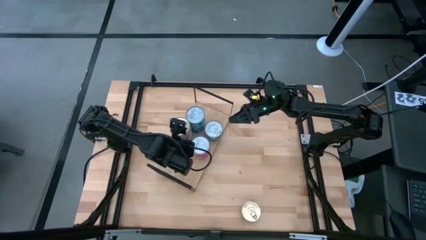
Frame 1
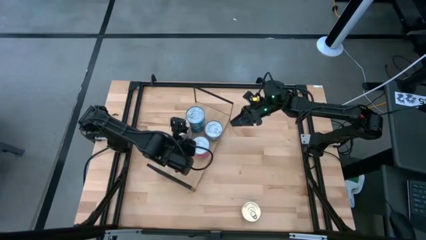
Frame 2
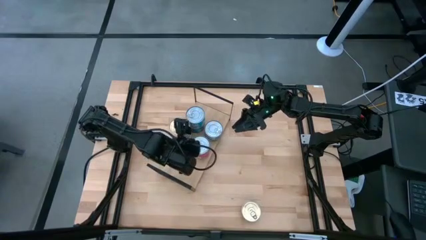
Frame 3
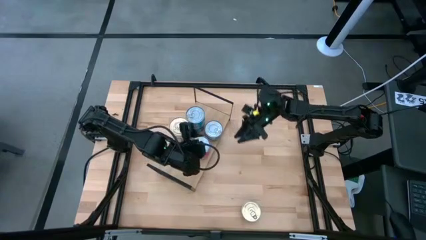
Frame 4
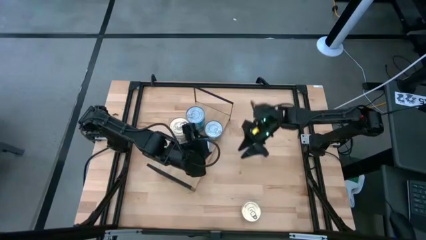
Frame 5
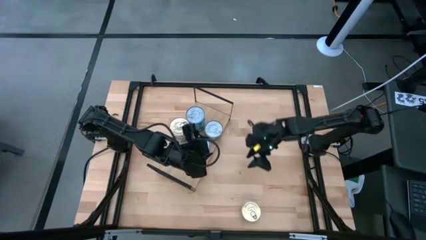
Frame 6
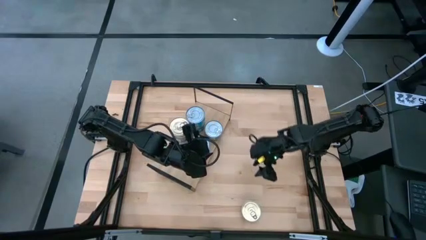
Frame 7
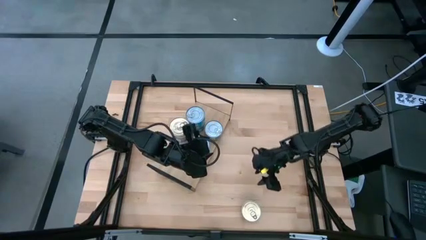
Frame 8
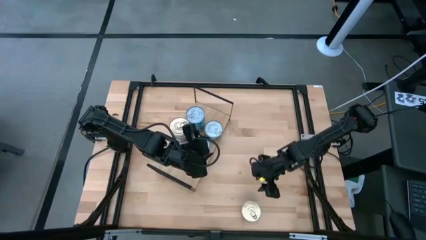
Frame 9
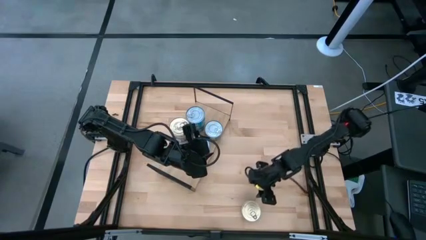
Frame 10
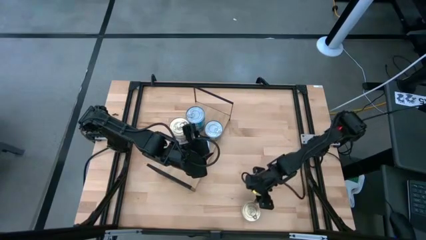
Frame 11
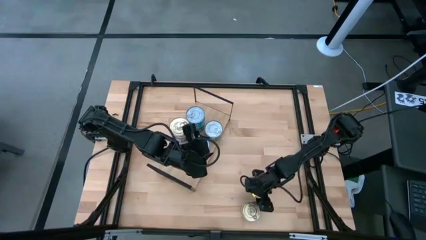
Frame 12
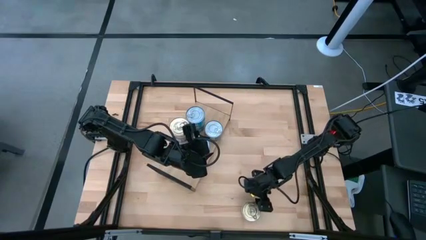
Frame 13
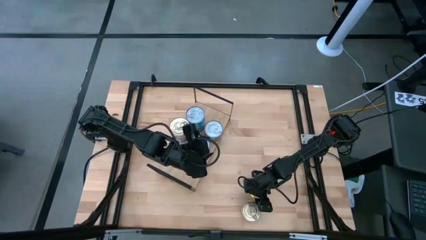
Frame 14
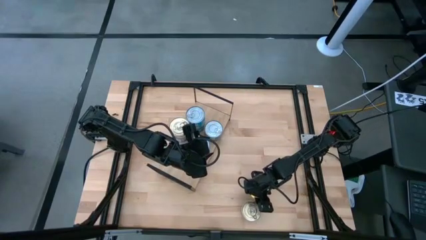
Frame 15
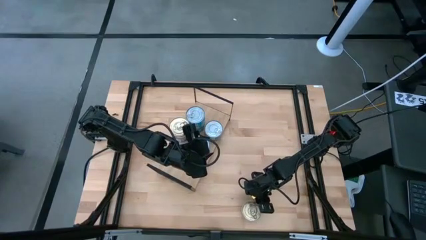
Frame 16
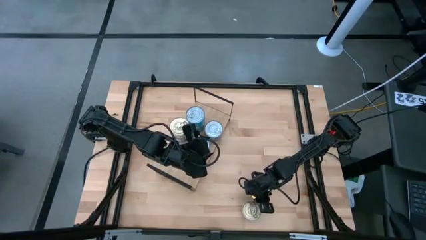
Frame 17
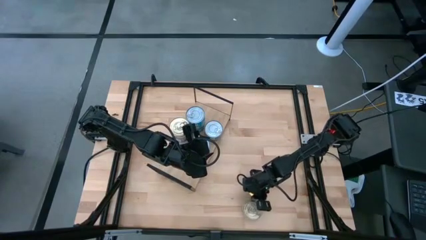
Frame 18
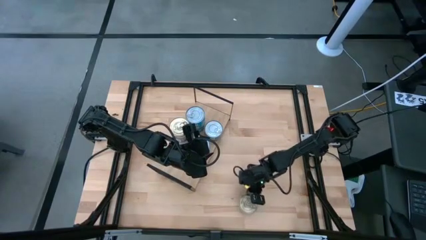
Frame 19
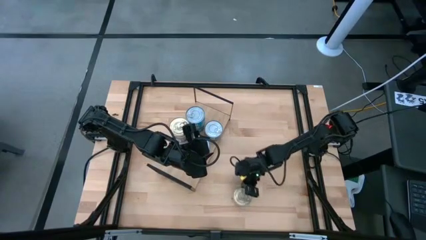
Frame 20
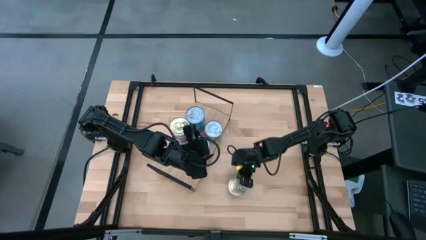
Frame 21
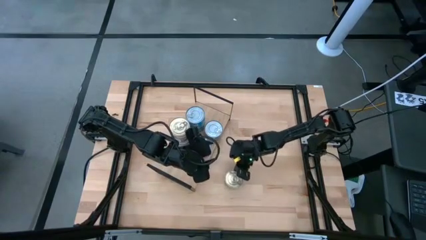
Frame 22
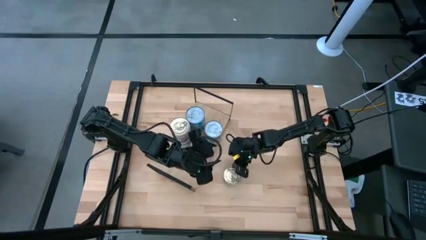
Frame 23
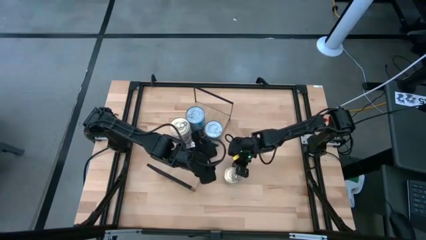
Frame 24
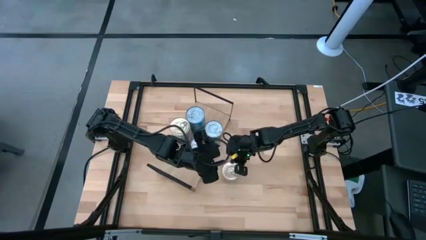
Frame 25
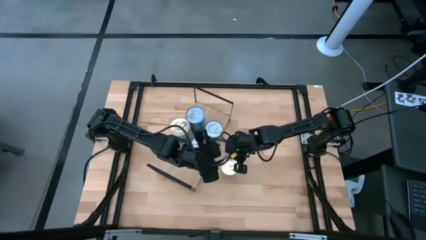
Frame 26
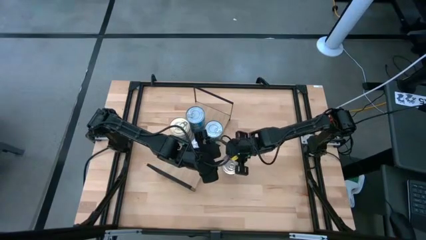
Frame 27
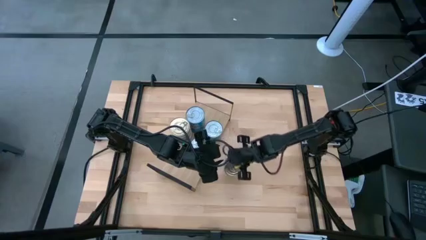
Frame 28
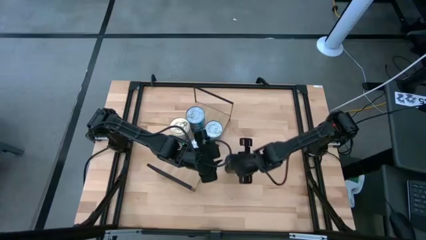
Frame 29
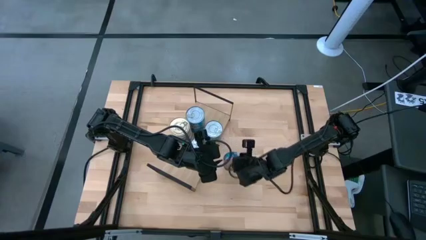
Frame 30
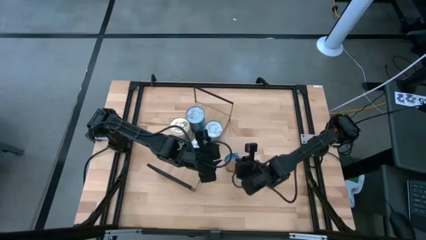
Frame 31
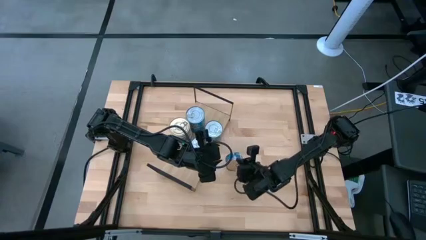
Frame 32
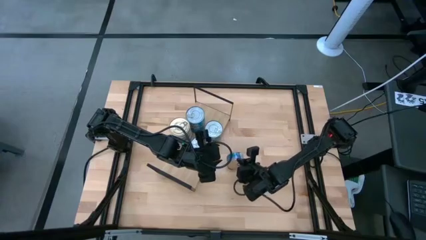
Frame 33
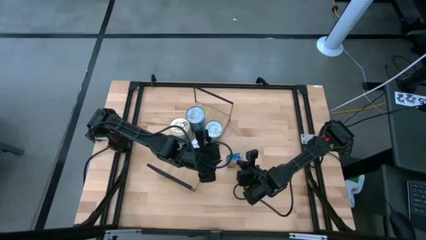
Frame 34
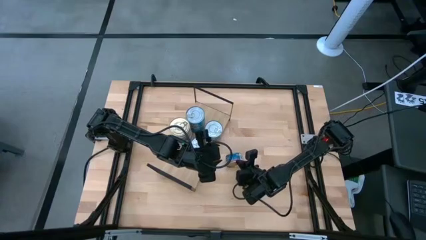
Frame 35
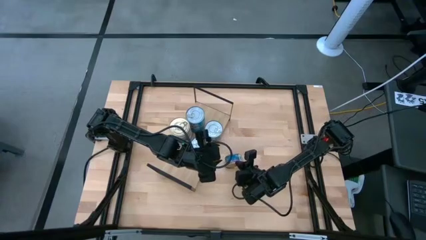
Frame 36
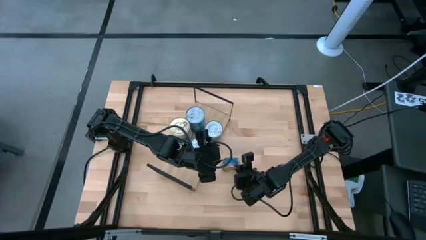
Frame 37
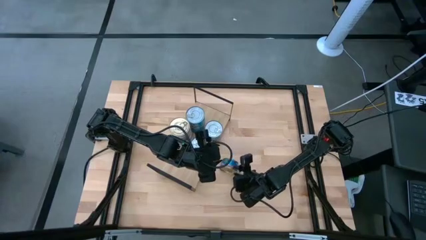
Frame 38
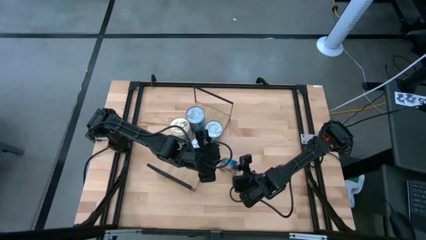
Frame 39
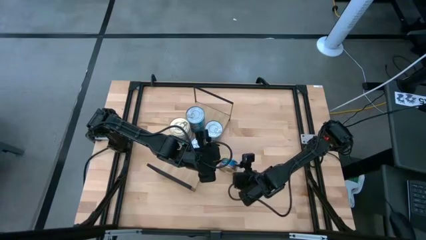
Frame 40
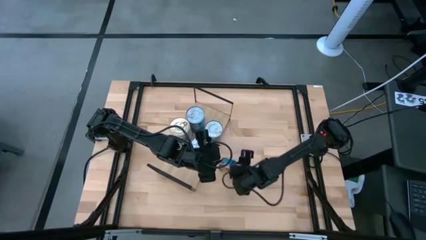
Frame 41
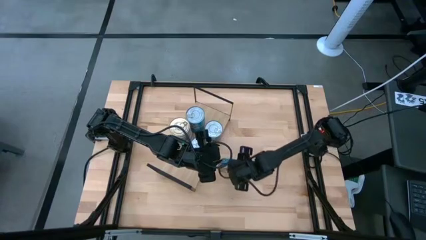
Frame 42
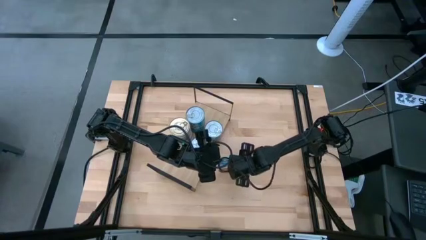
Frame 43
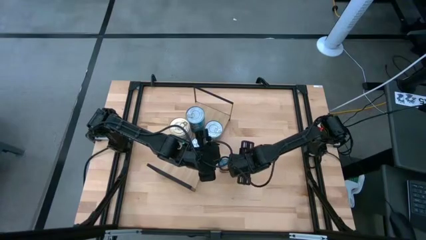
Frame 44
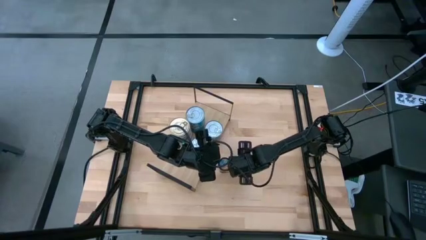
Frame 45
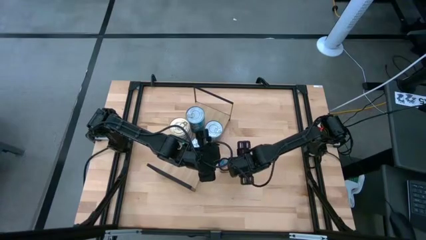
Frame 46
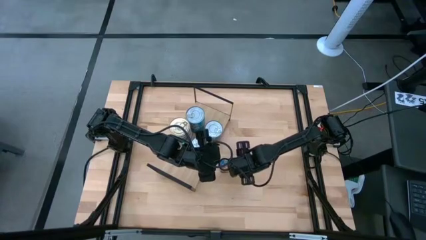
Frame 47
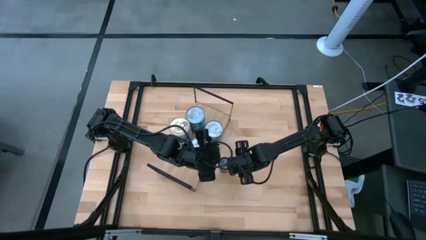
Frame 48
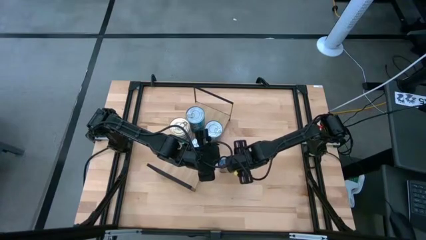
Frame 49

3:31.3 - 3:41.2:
Task: Stack canned seafood by type on shelf
Stack the blue tuna can on top of the blue tuna can on the shelf

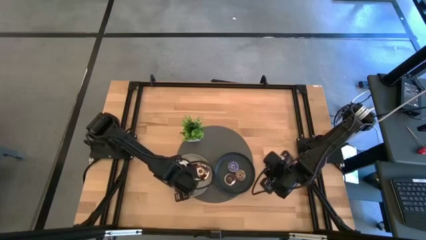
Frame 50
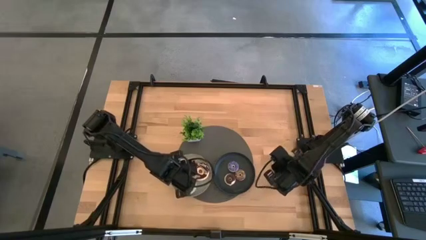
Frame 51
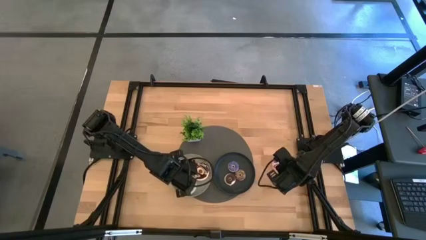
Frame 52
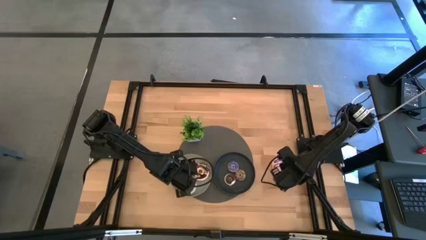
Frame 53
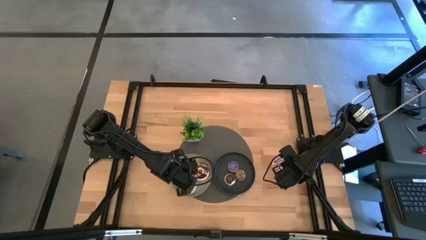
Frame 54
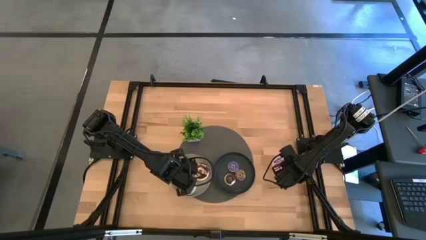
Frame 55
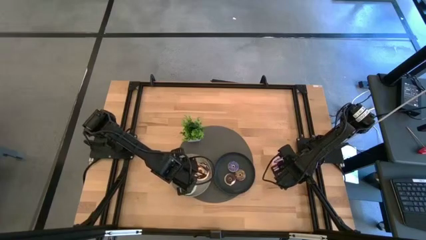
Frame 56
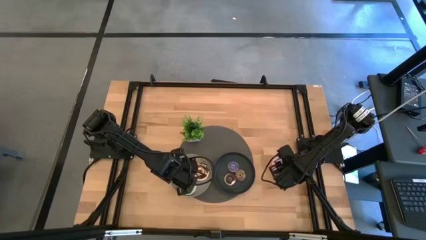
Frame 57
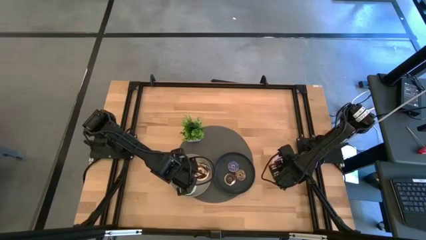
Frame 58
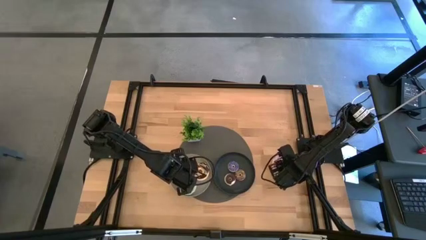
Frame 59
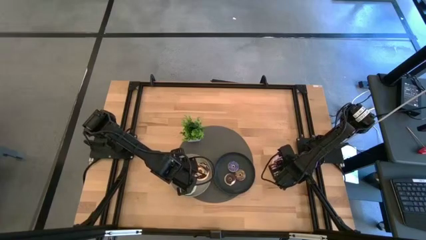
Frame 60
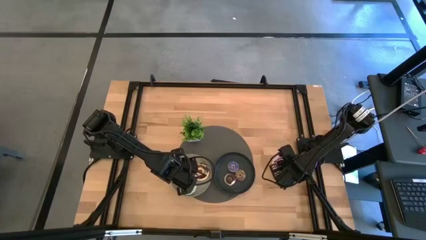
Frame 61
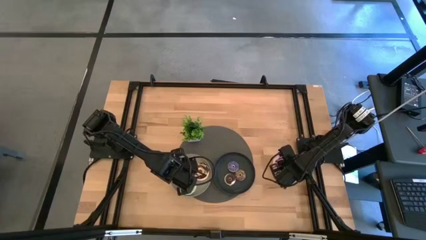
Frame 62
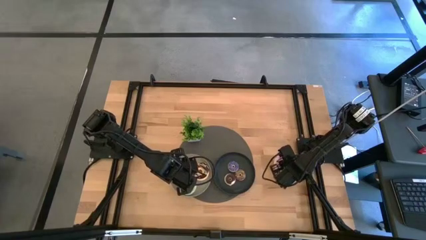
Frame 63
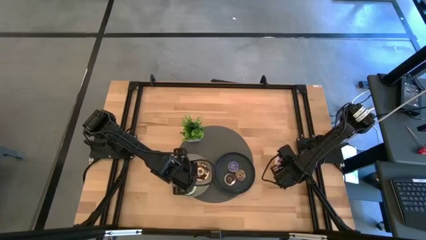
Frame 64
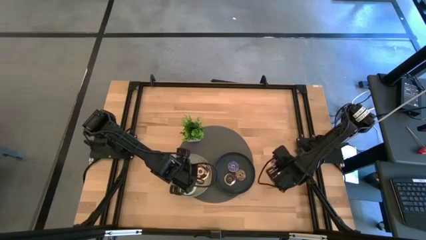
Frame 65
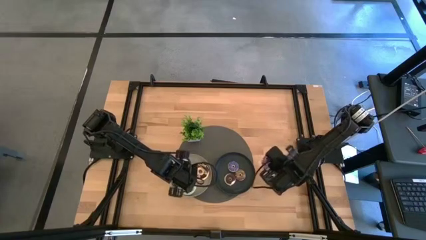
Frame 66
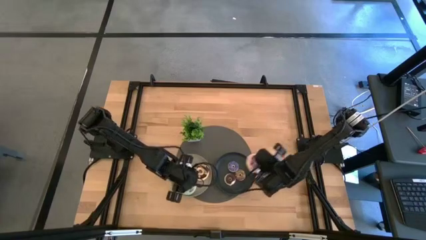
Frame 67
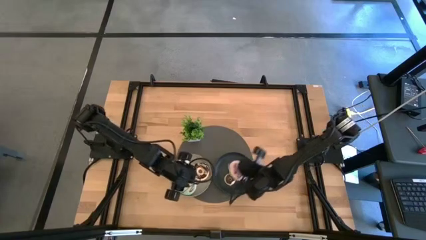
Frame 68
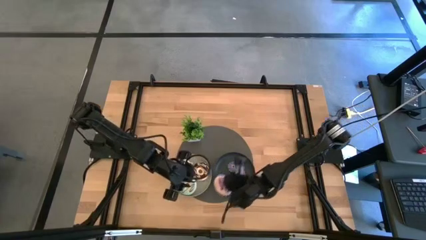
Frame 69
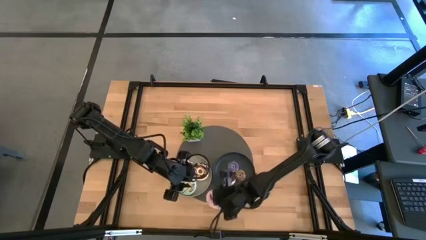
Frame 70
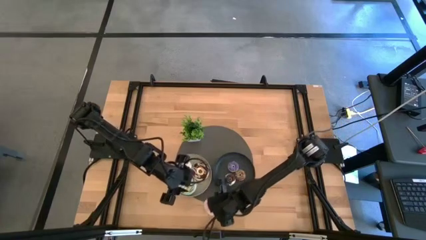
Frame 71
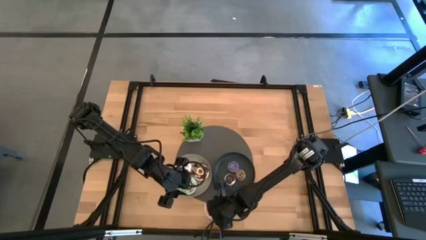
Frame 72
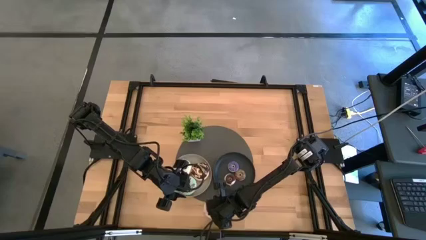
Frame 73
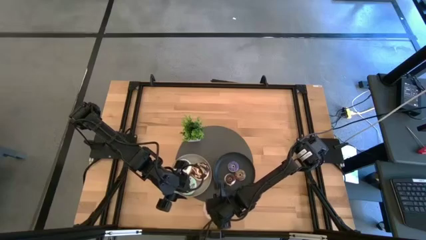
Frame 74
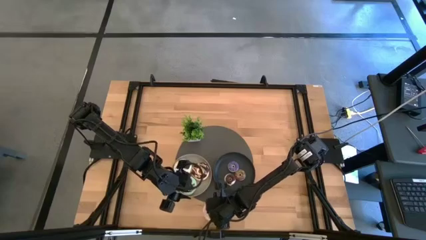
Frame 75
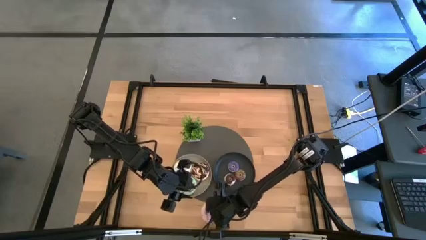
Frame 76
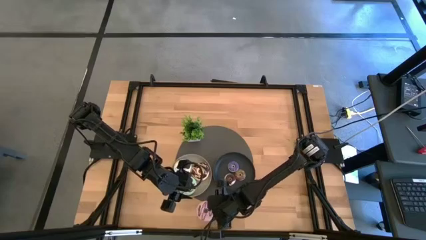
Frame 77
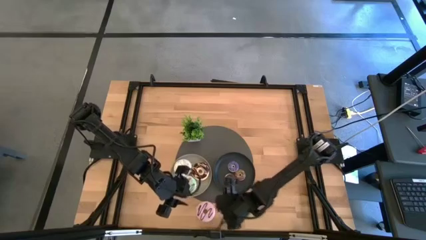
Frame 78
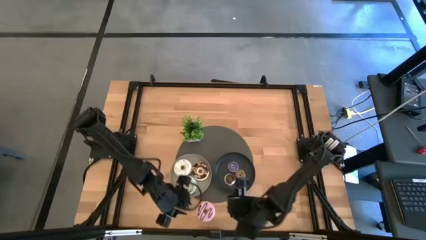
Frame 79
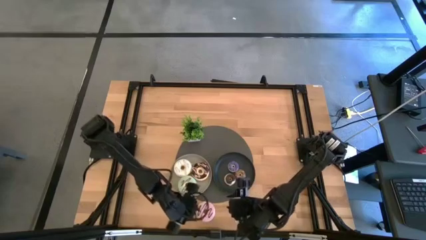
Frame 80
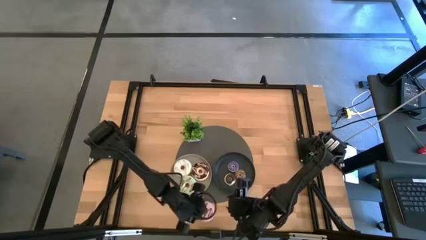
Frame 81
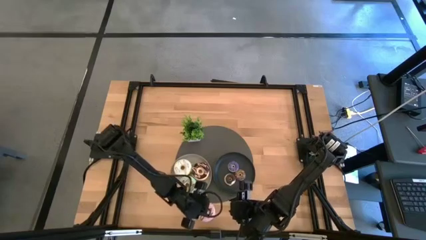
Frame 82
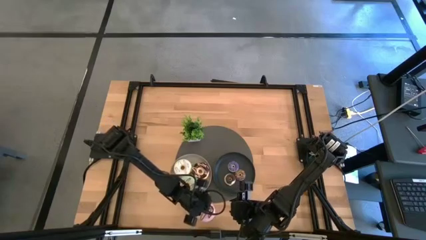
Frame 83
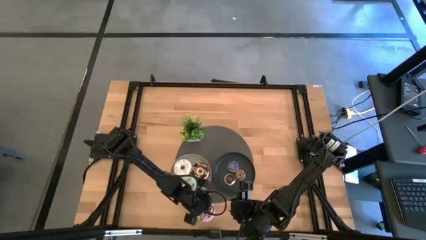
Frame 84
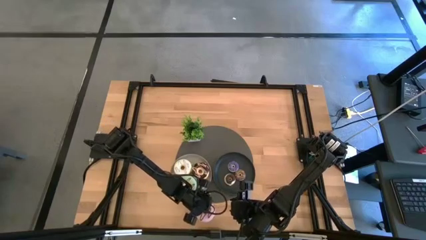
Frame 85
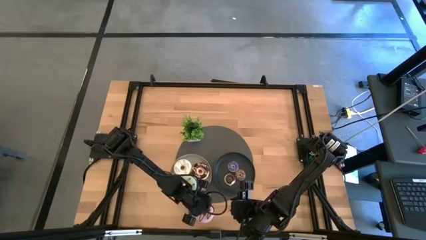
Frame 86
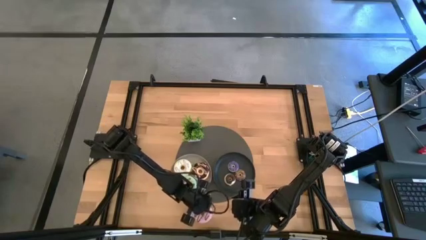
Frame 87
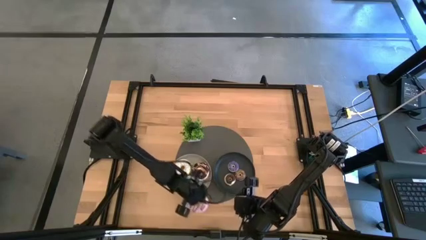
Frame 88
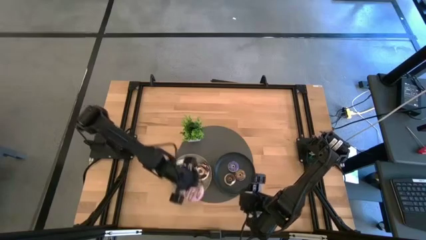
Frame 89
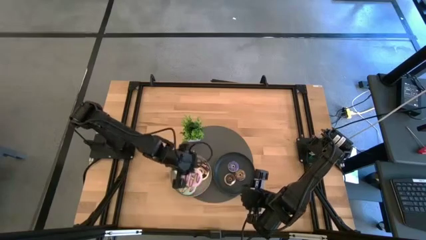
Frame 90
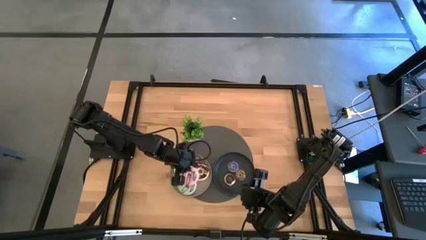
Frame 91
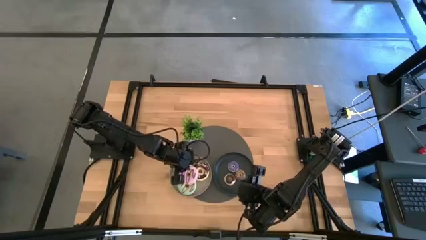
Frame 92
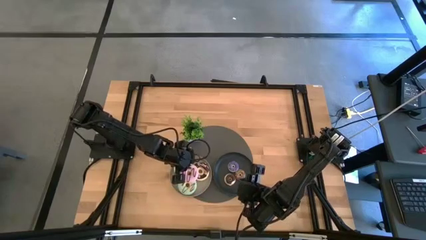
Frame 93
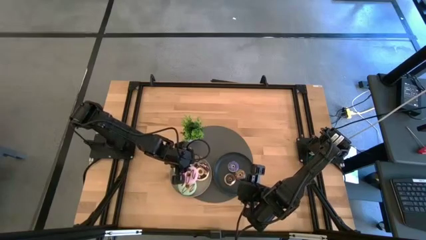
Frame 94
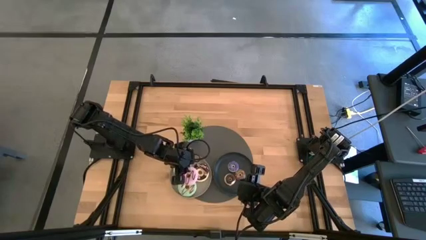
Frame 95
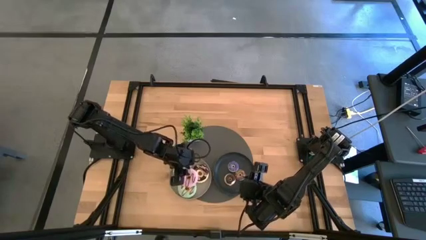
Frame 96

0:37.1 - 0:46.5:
Task: Pick & Place donuts
Put the large purple donut on the gray plate
